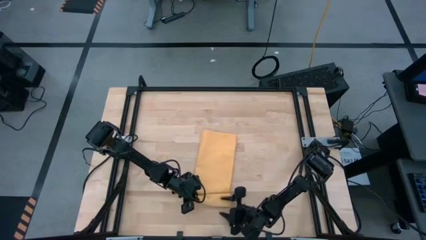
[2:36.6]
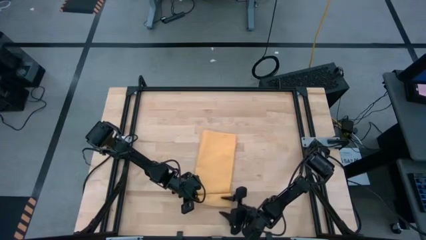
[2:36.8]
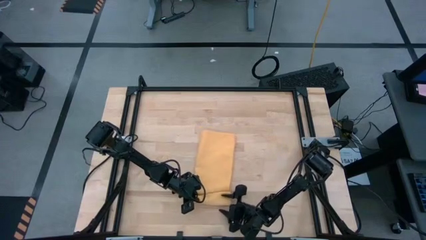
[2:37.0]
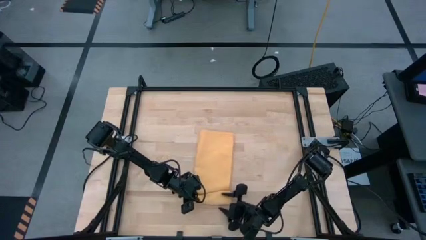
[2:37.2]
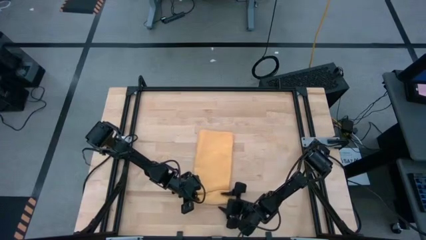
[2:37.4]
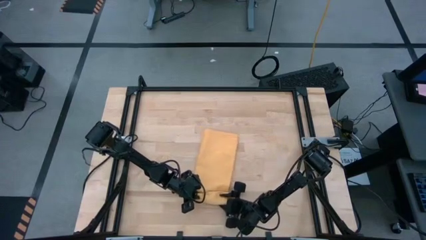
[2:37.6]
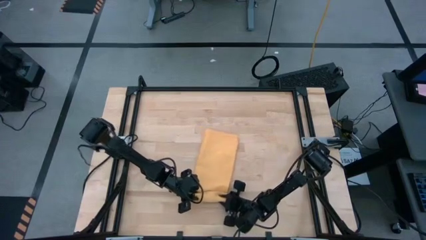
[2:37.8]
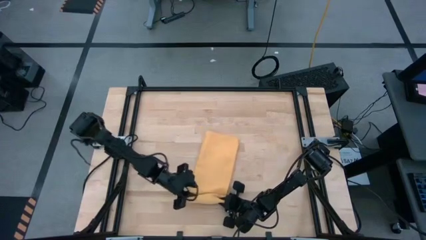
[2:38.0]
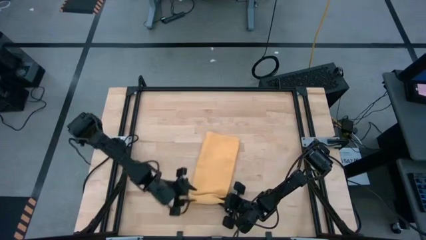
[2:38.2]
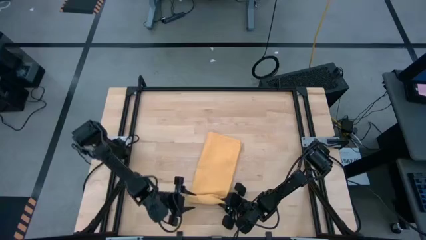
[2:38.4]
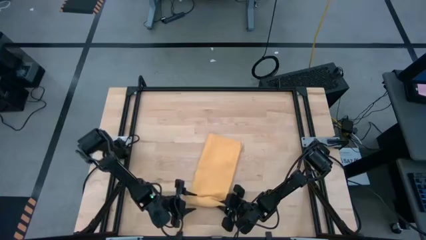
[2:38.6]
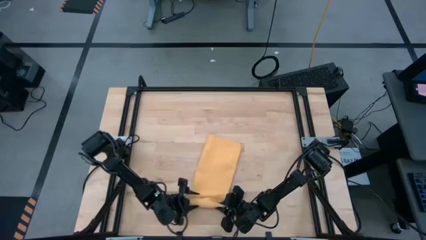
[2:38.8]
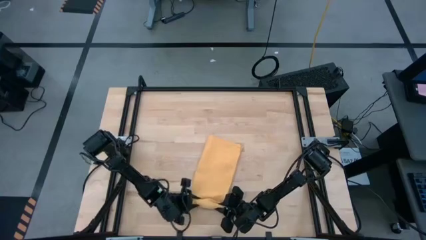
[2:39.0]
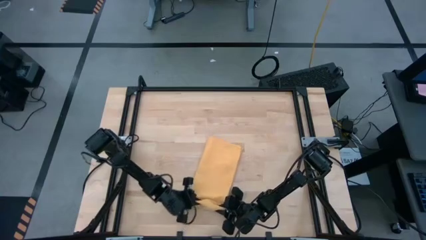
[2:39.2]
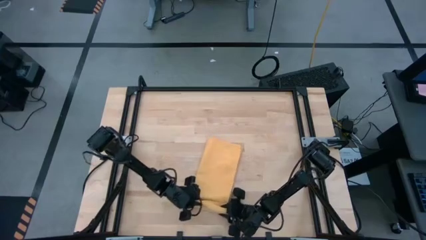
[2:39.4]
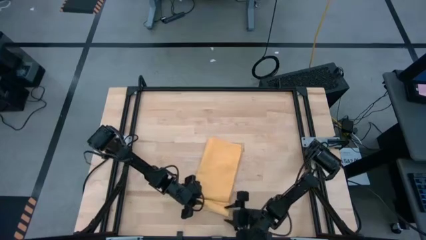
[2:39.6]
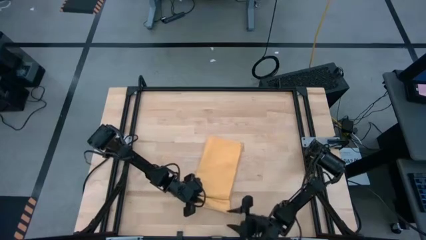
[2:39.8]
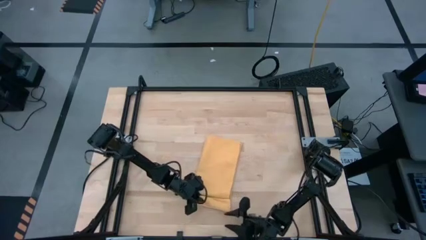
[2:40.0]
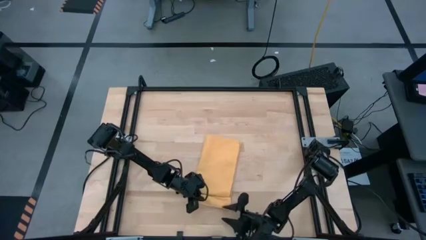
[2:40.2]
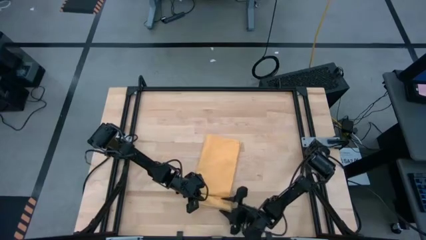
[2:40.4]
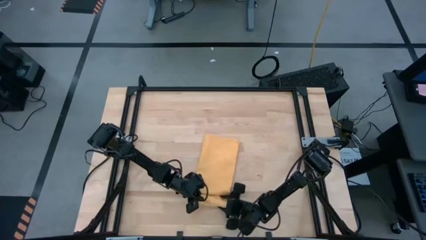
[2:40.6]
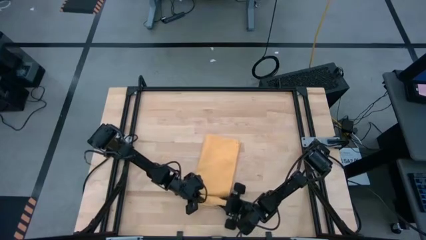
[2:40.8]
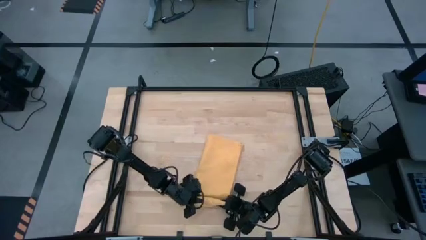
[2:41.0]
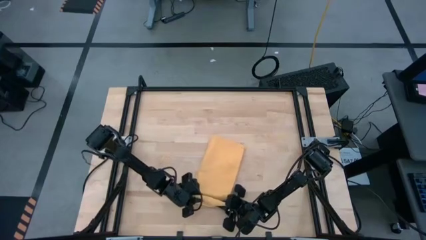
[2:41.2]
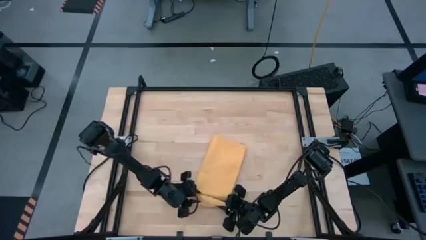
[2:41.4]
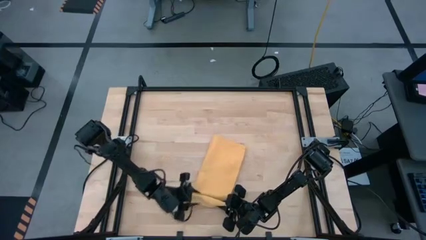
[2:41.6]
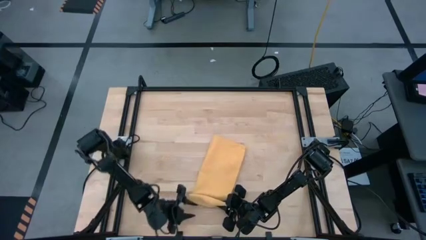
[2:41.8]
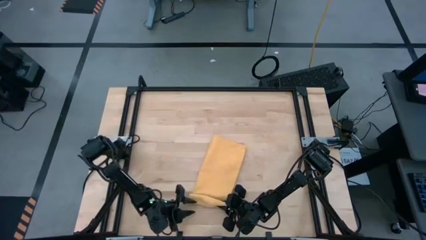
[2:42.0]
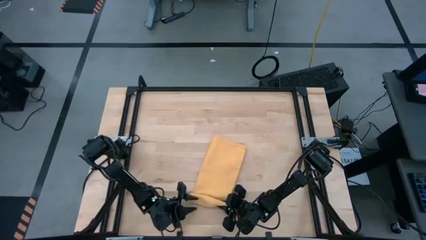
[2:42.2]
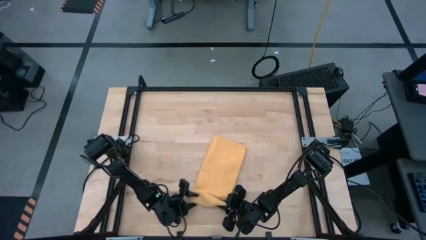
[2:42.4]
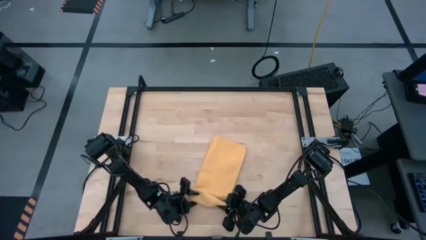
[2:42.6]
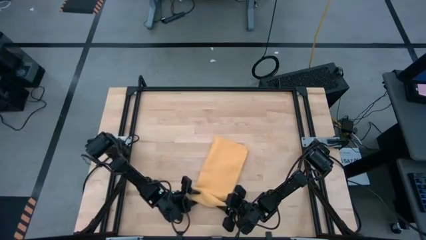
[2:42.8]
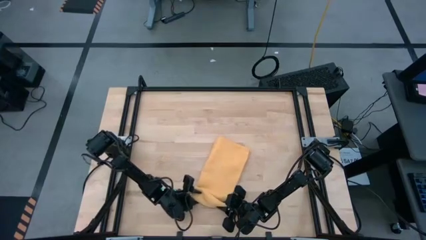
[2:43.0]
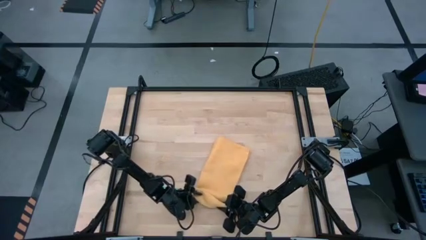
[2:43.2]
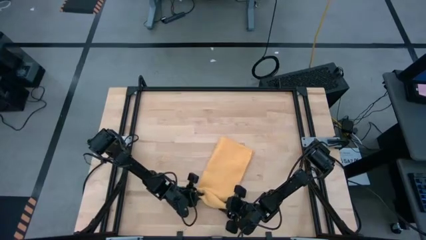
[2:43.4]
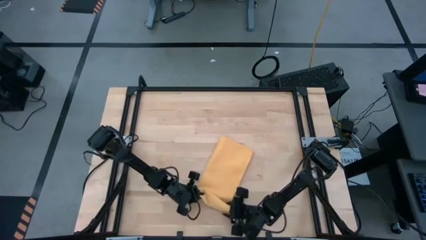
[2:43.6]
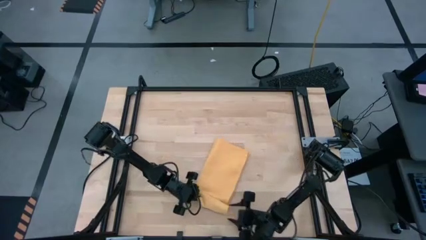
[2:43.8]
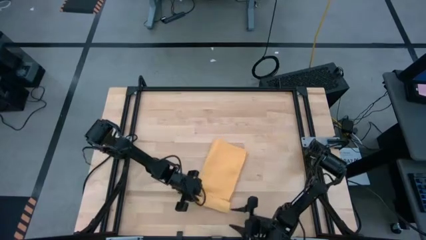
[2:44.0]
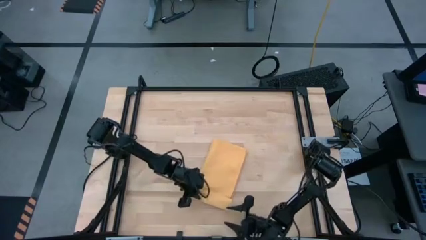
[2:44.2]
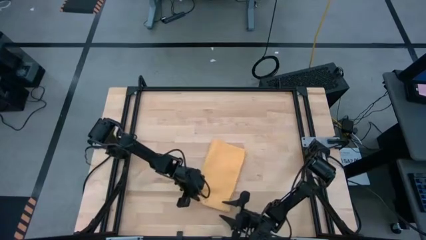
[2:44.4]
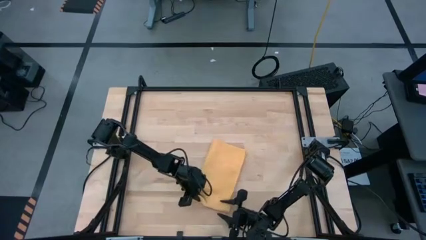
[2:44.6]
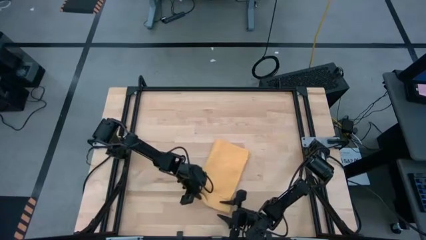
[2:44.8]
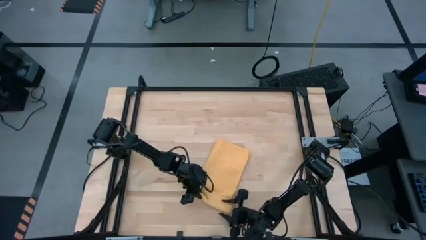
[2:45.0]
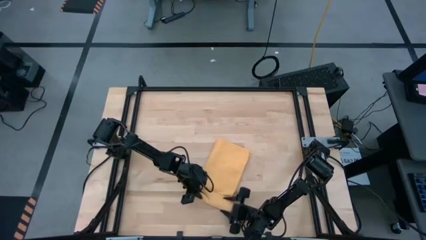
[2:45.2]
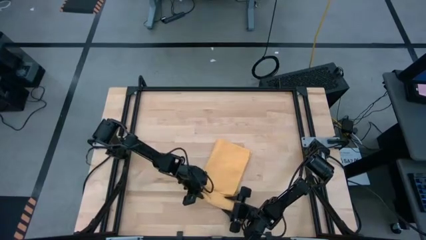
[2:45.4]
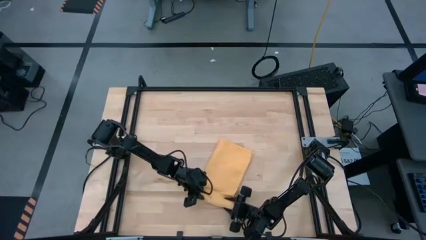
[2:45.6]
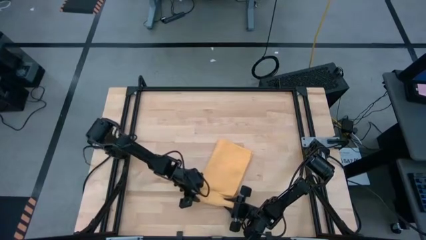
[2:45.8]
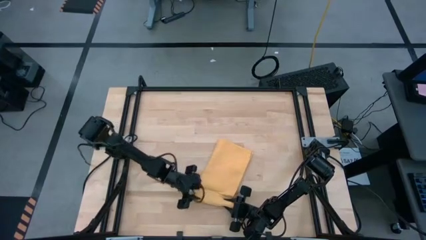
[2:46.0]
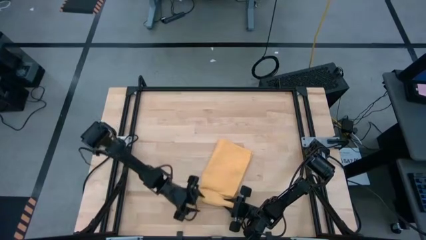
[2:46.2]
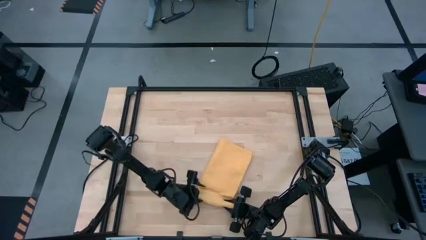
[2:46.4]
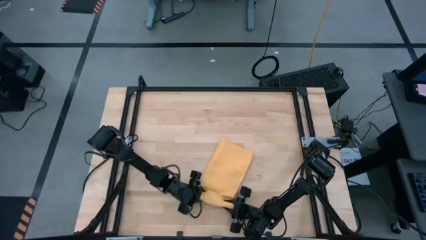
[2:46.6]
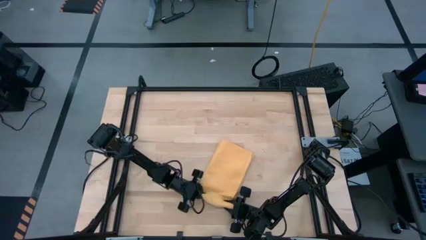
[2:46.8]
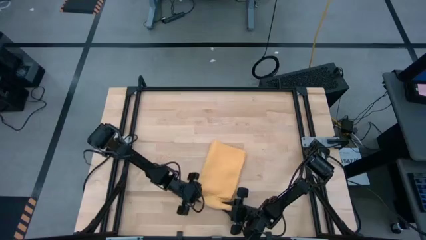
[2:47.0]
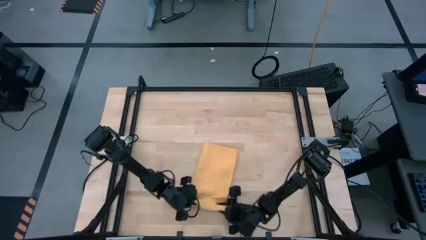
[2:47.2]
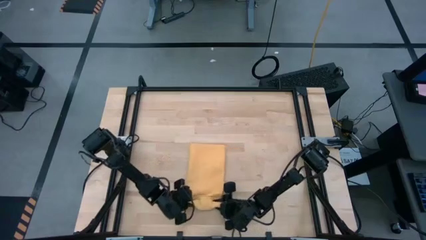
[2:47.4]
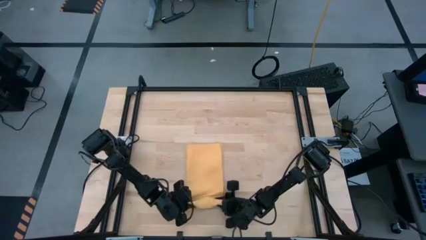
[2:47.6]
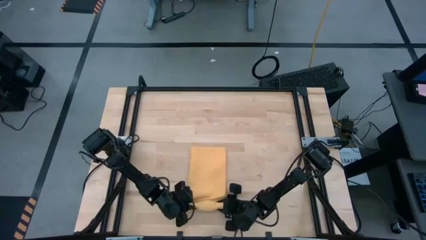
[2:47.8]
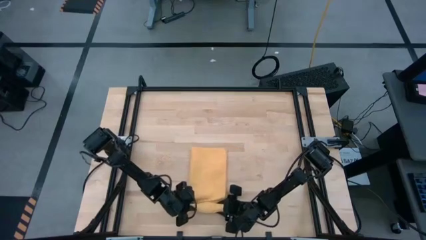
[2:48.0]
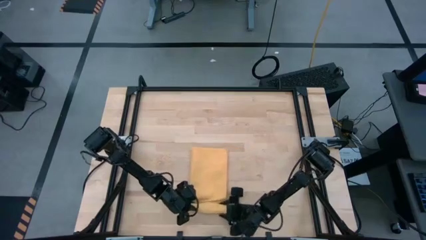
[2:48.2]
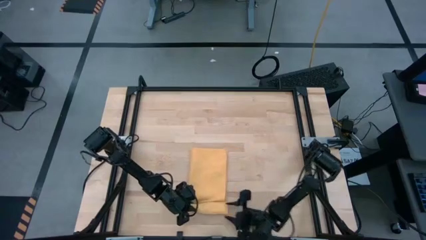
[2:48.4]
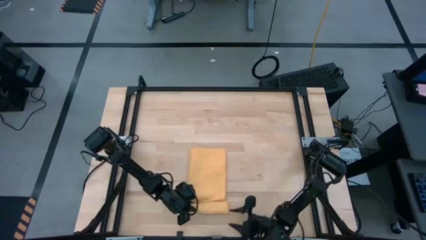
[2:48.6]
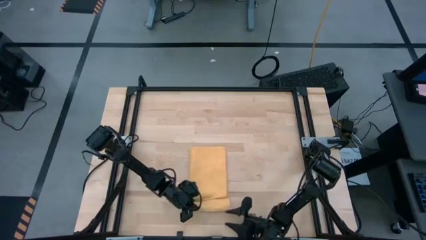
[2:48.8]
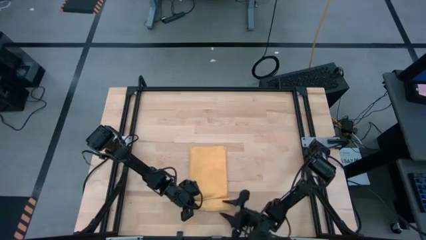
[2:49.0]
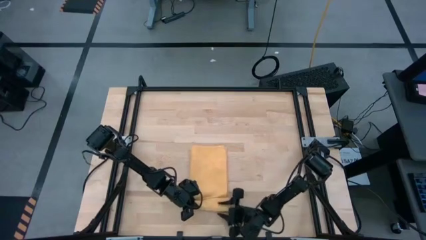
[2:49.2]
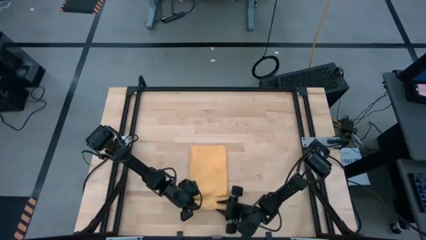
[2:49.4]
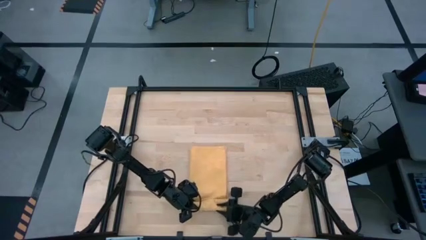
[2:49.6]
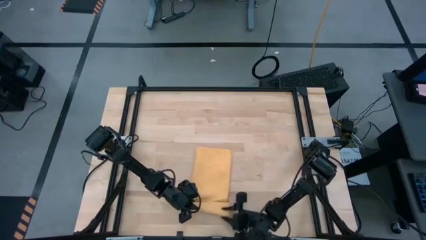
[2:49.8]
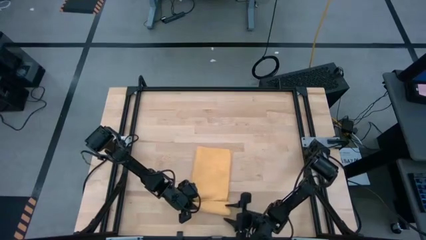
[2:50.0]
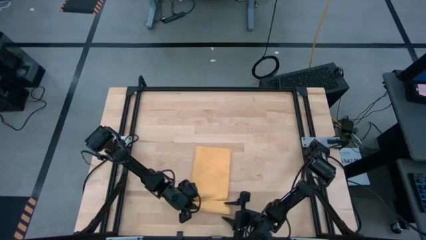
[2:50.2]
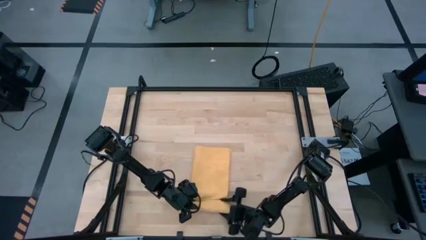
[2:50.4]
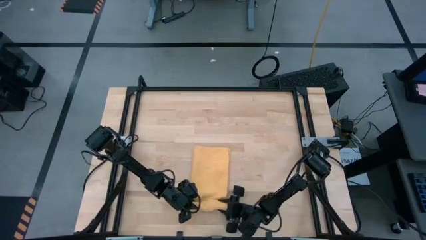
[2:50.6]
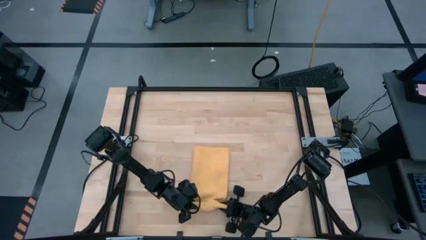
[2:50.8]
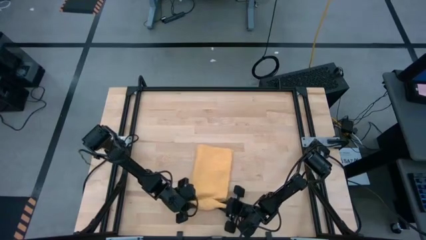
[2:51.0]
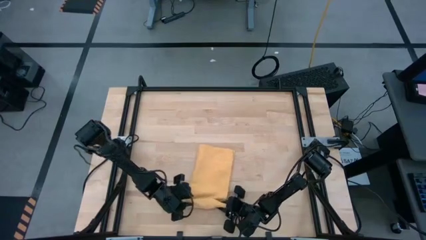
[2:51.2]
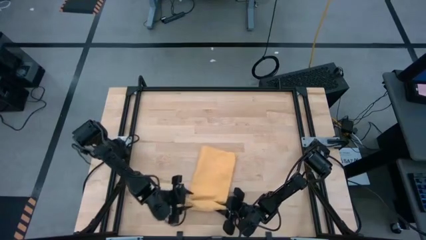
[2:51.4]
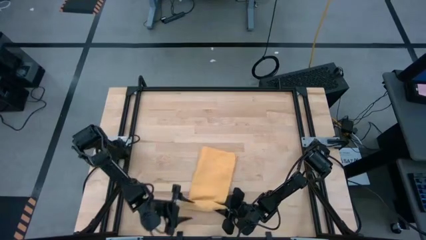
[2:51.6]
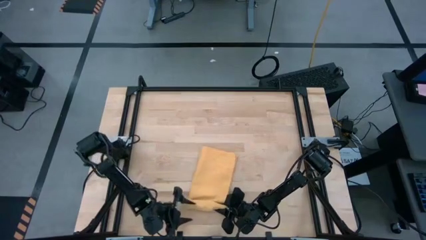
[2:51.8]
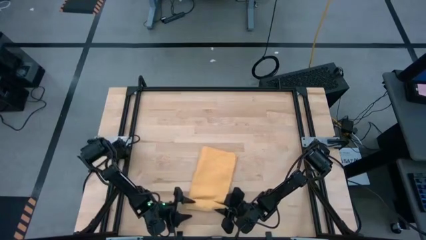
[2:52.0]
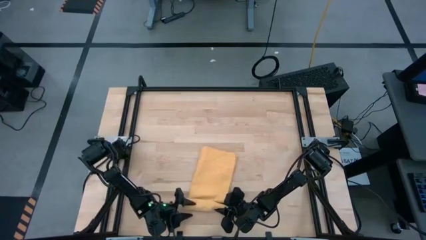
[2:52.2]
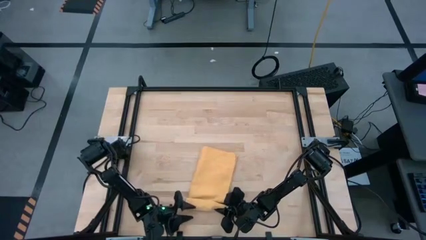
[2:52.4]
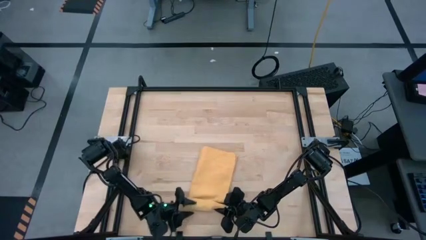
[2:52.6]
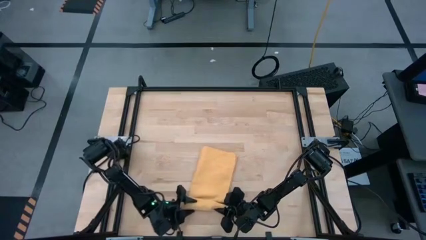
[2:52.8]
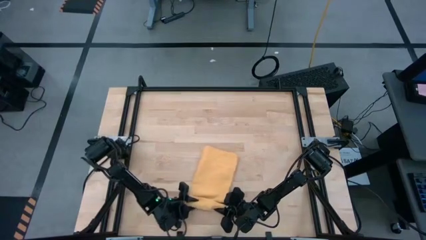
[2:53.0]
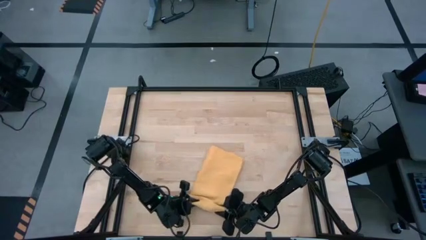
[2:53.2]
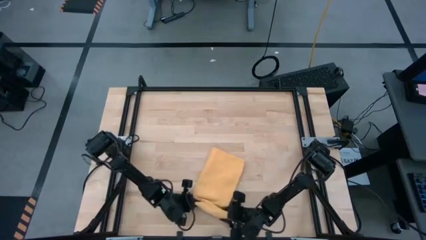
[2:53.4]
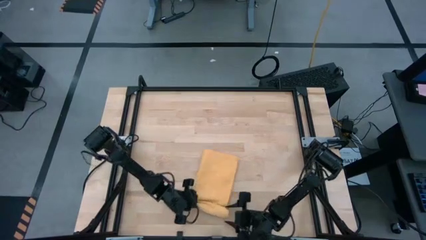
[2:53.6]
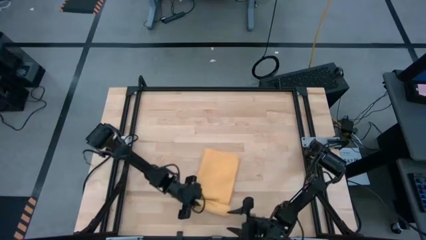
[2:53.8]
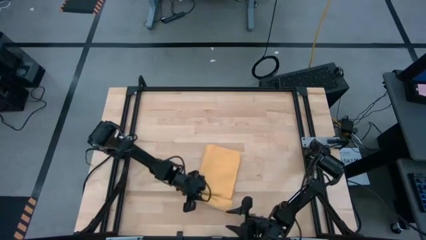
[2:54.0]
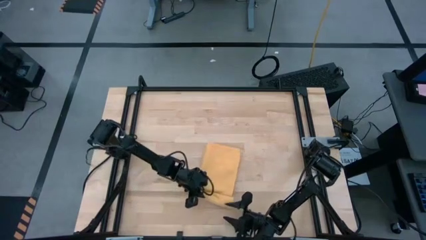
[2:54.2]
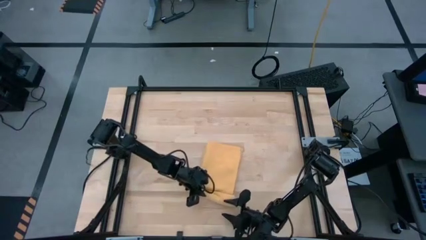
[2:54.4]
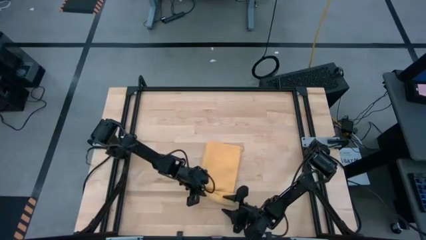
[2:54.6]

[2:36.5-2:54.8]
Task: Roll towel
Roll the yellow towel
